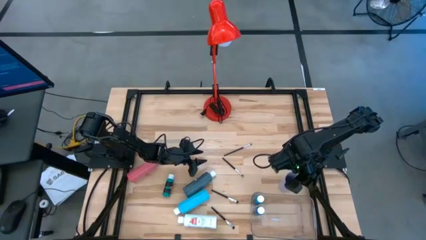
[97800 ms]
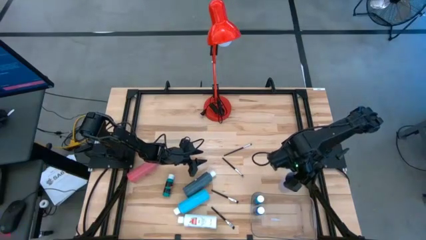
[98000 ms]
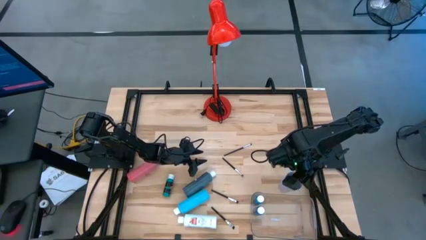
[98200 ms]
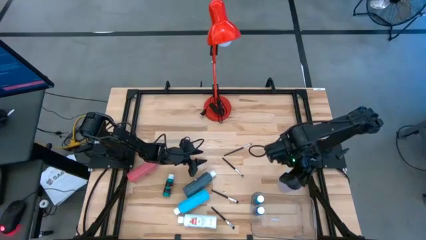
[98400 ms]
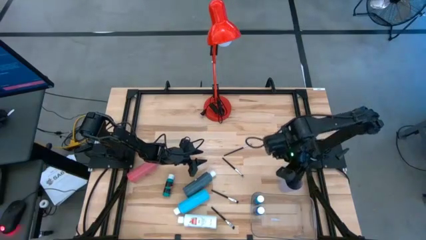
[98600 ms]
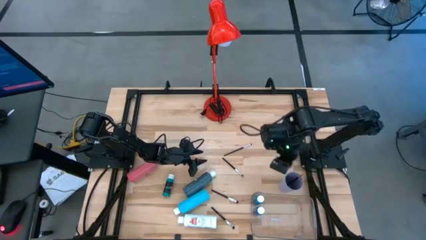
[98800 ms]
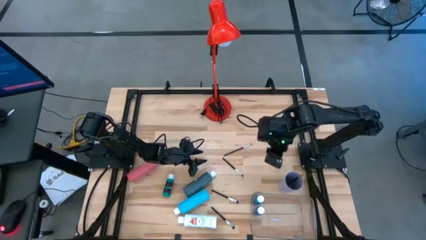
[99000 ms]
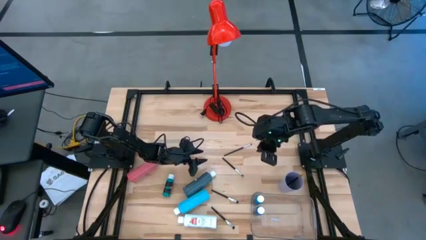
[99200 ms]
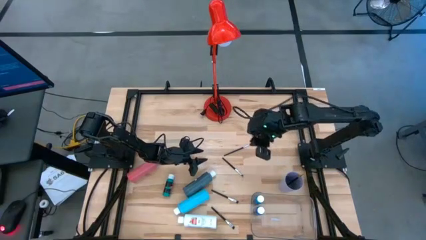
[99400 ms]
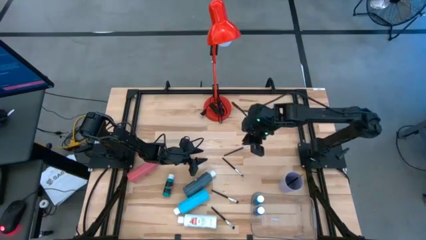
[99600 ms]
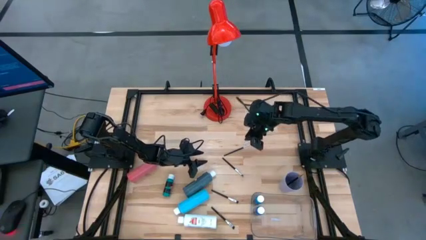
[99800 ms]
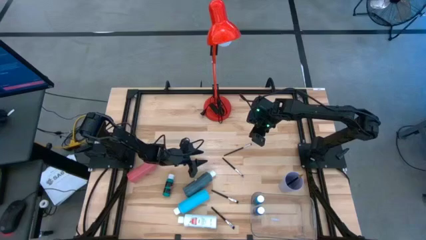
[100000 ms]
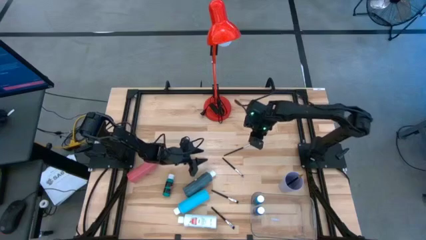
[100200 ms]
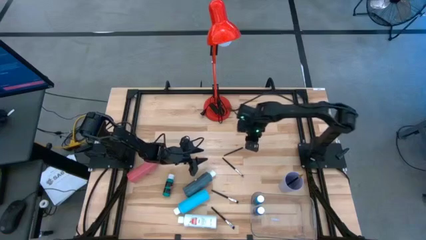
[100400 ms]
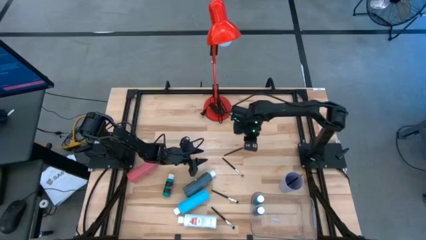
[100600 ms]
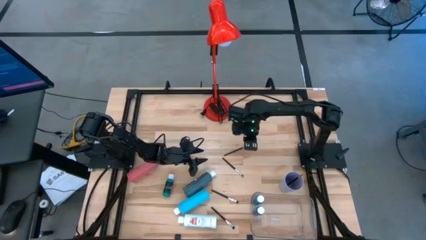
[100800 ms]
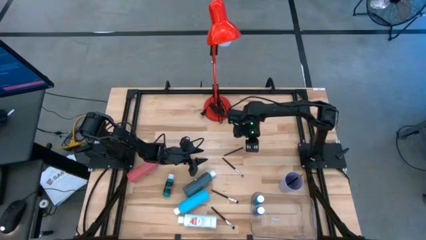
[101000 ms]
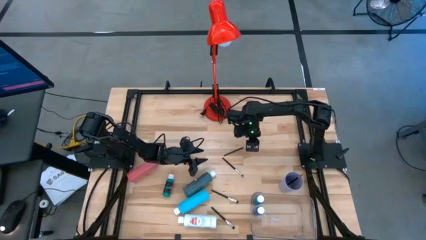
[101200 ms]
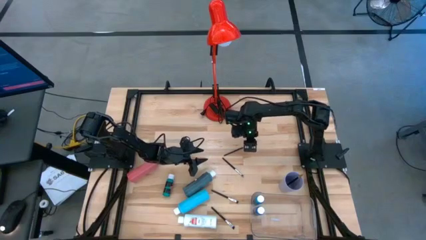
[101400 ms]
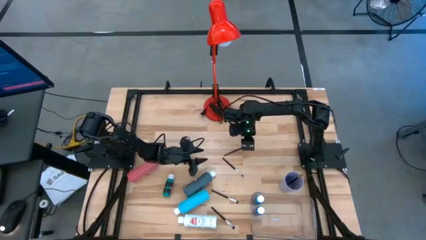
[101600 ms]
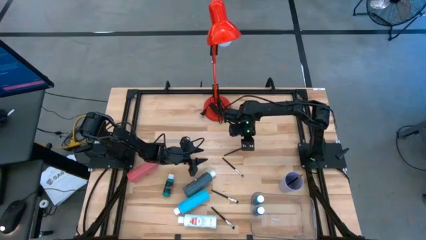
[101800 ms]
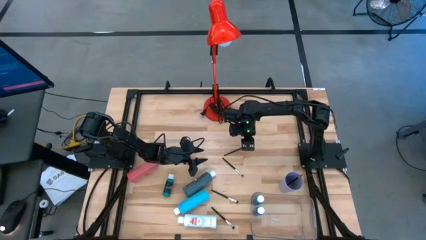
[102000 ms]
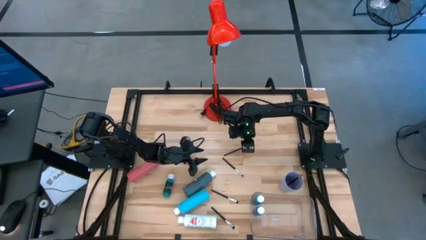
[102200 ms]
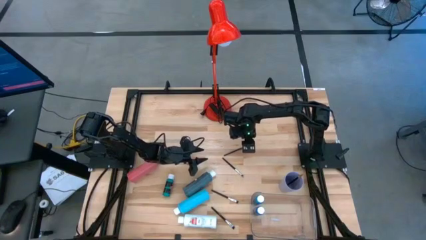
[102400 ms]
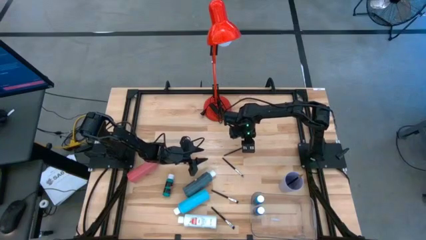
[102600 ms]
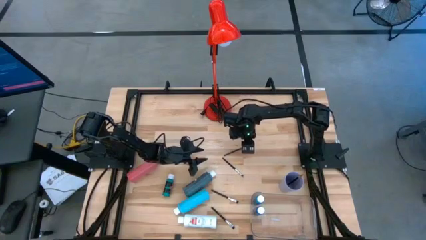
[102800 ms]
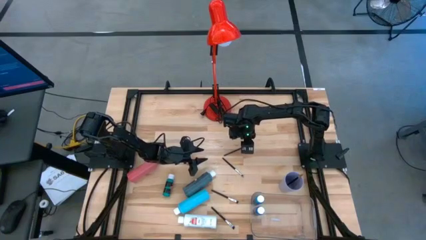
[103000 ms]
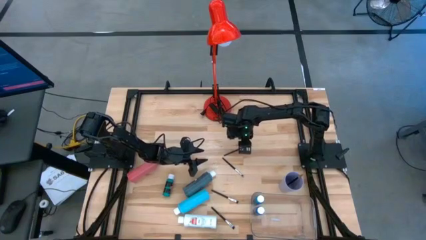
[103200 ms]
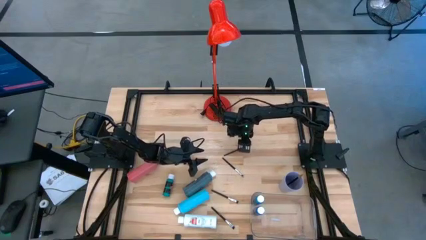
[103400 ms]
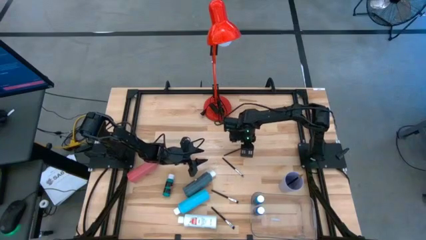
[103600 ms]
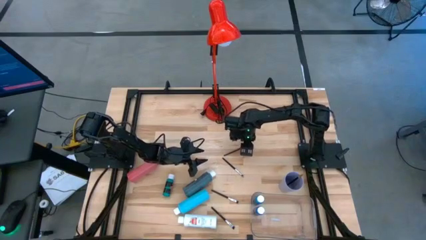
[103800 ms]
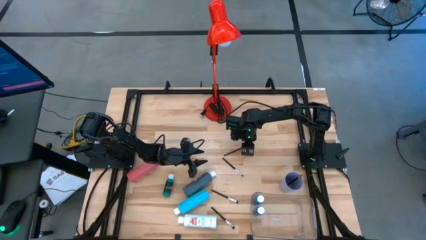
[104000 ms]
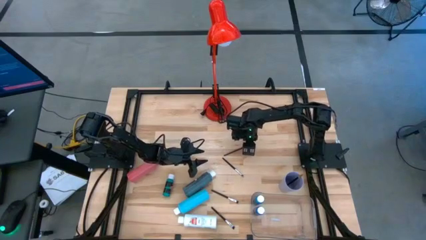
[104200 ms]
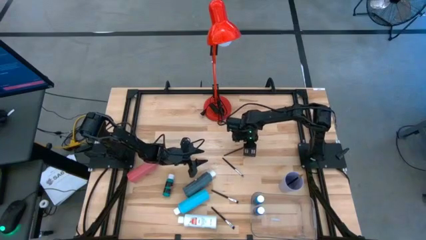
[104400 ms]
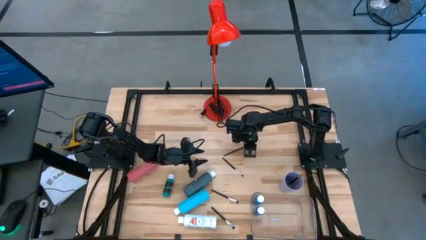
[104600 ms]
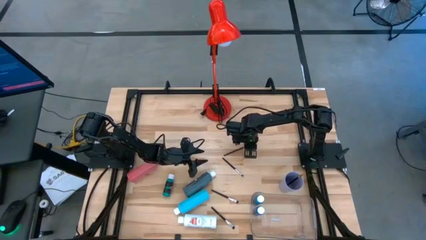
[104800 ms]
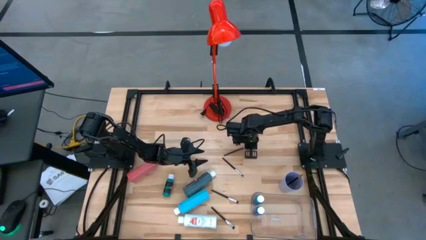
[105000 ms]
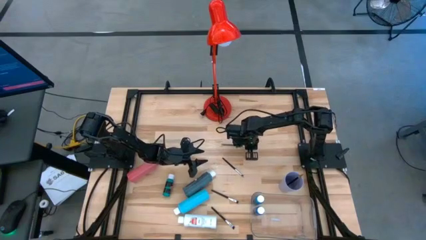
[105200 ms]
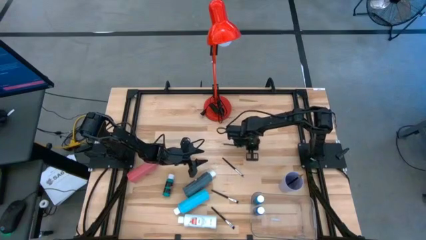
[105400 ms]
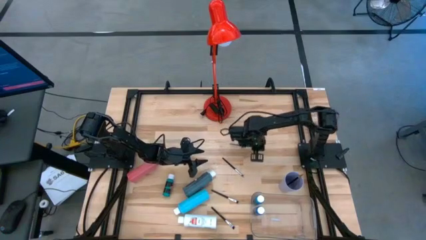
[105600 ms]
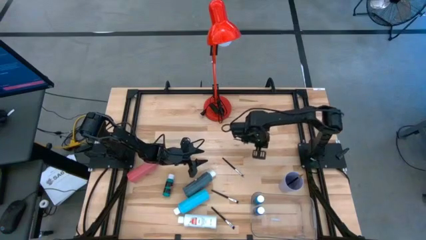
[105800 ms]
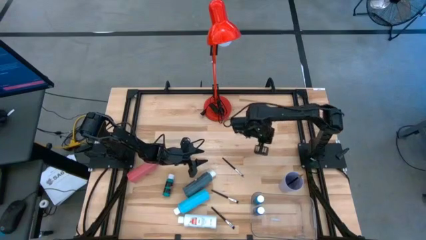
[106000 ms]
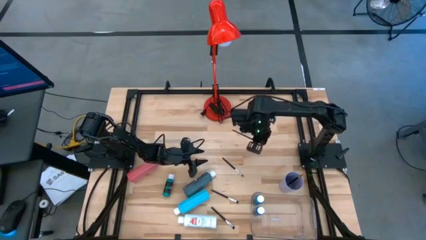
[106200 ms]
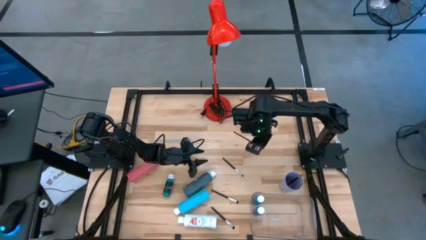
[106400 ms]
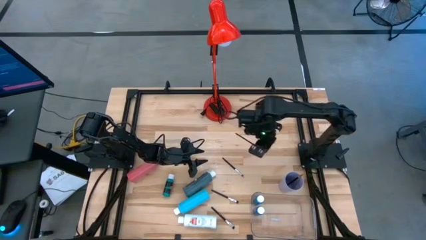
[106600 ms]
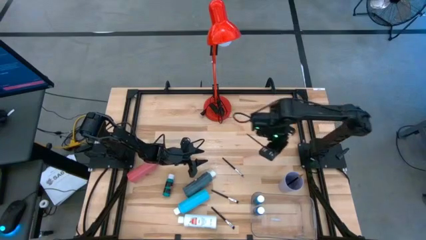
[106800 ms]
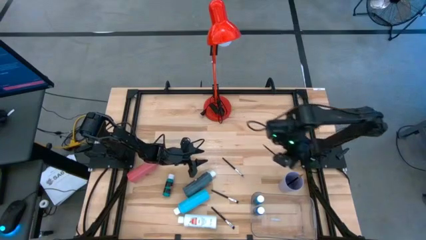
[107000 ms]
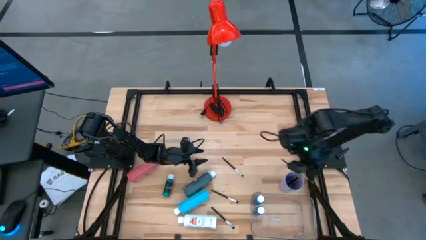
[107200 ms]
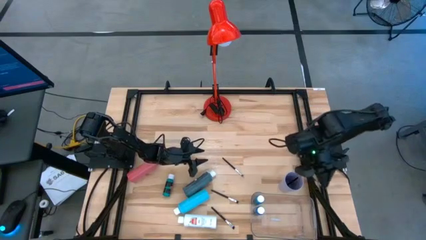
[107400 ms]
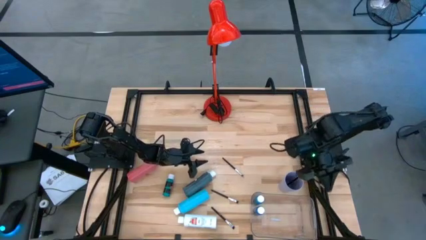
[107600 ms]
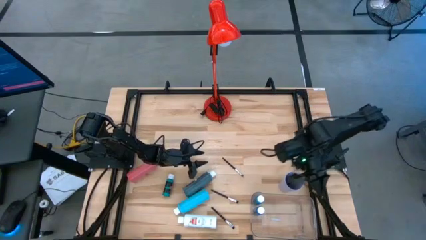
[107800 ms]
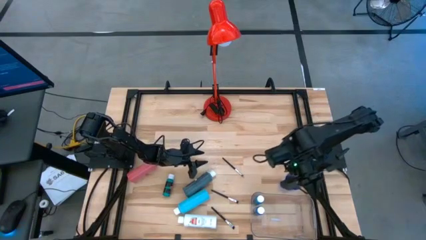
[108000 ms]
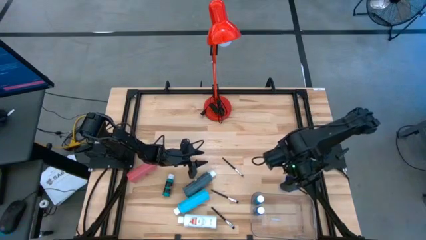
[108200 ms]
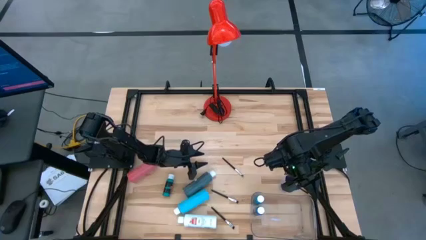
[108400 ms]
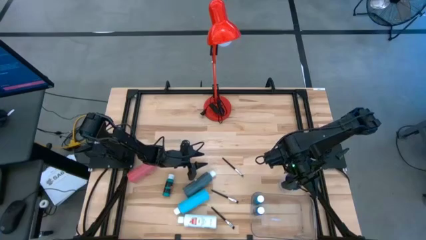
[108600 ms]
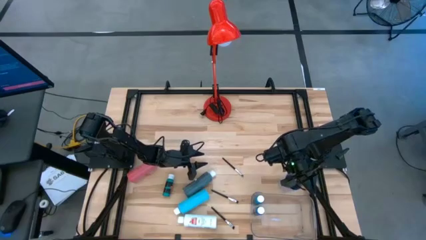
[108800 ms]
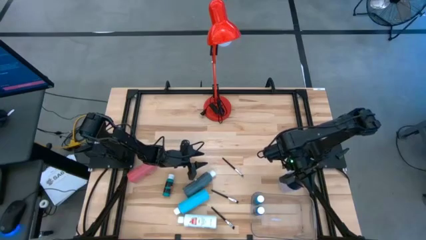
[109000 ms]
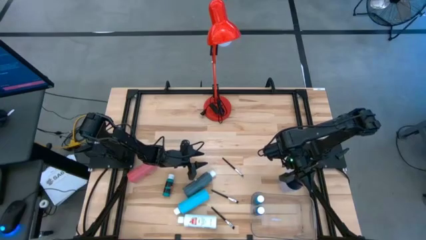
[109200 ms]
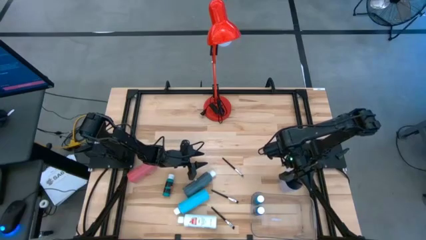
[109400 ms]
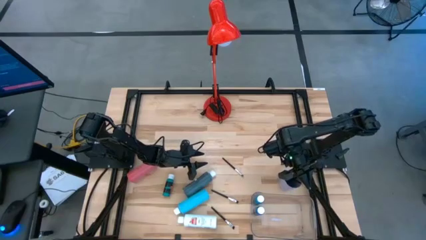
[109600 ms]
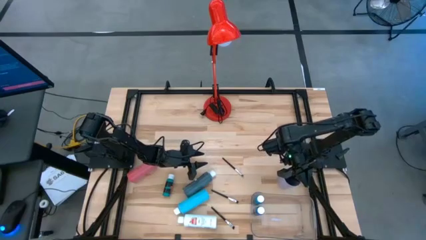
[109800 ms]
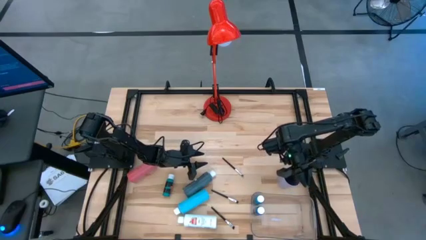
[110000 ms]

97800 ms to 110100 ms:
Task: Pick & Place Paint Supplies
Put the black silver paint brush into the purple cup

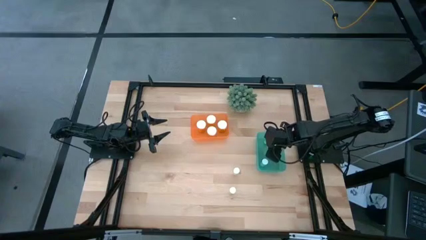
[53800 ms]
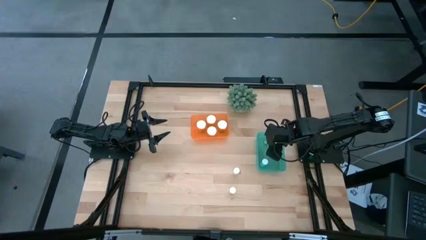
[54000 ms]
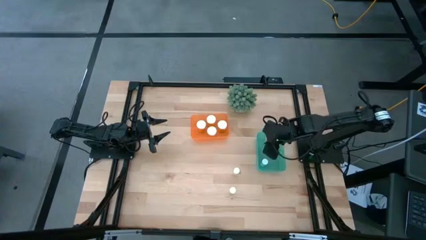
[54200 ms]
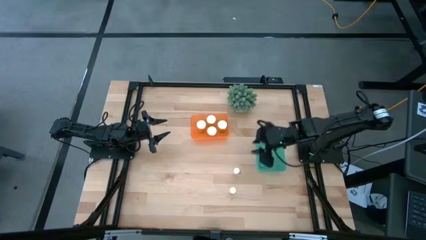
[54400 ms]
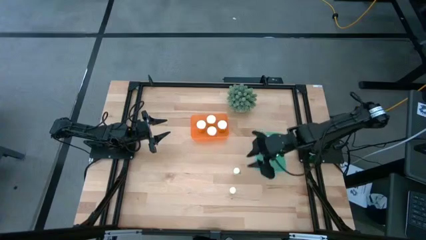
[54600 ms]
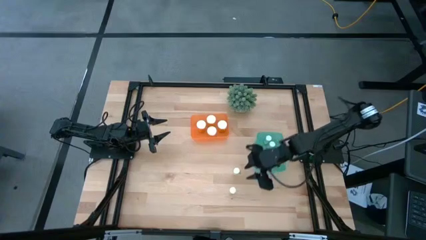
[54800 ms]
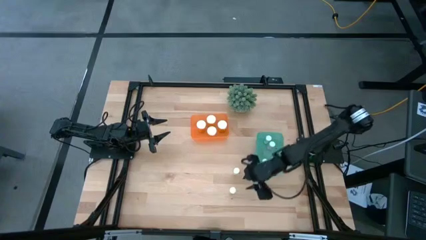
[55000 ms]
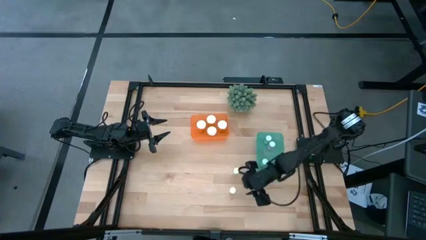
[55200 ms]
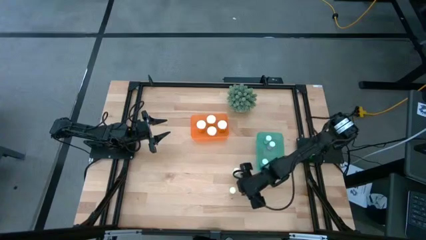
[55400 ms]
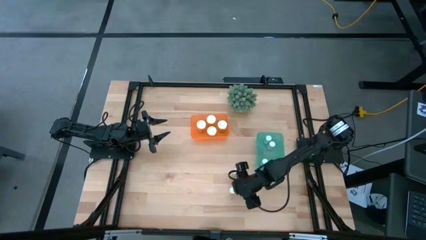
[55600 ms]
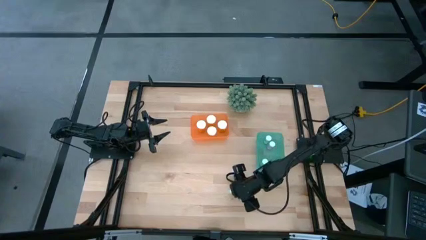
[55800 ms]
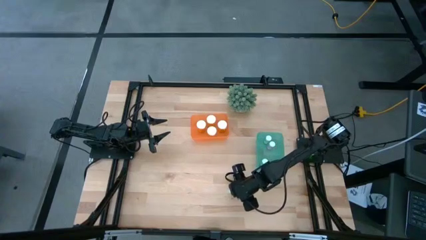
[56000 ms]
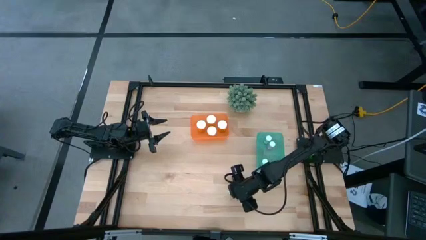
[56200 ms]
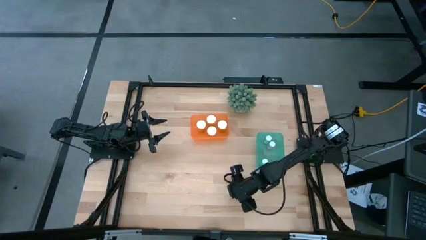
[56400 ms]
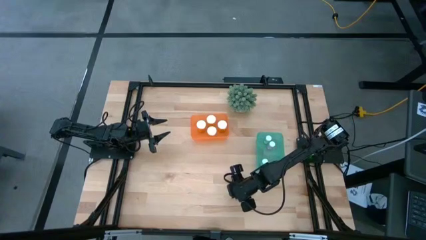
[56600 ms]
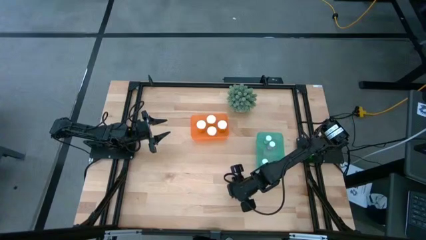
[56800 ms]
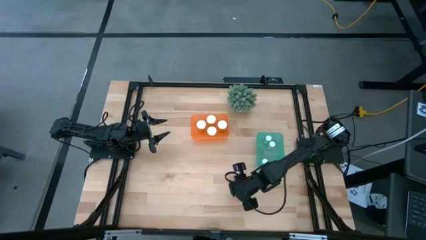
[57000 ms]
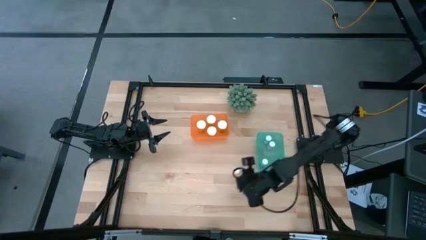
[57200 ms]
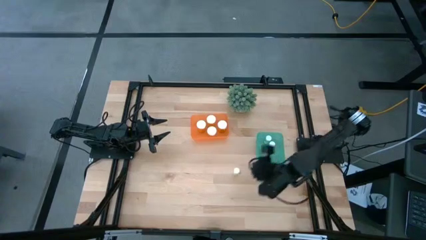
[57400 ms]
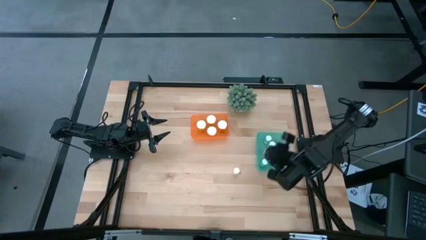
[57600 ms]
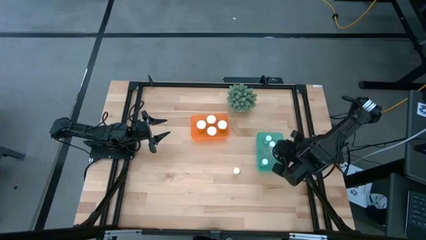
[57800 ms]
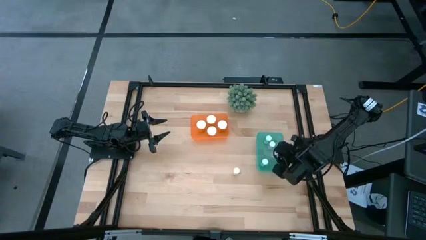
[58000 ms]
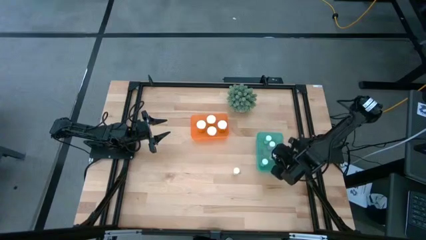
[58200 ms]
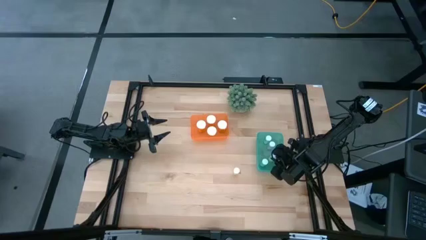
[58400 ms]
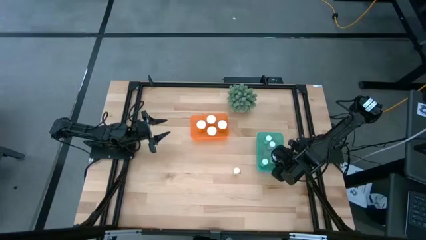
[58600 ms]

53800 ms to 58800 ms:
Task: Pick and place medicine bottles into bin by pill shape (circle, oval)
Put the yellow pill bottle into the blue bin
